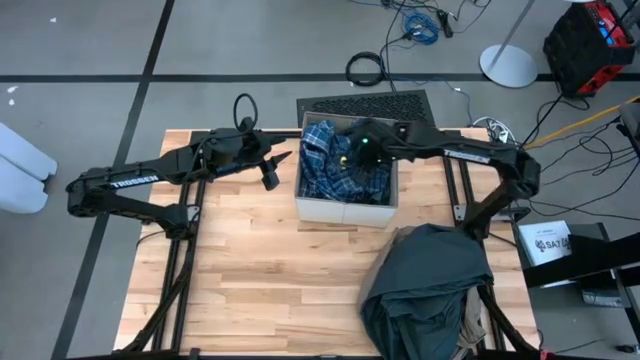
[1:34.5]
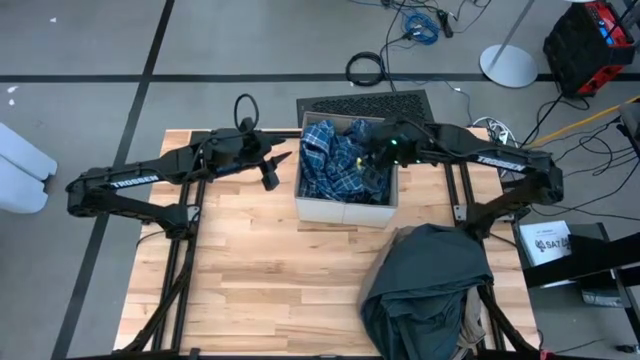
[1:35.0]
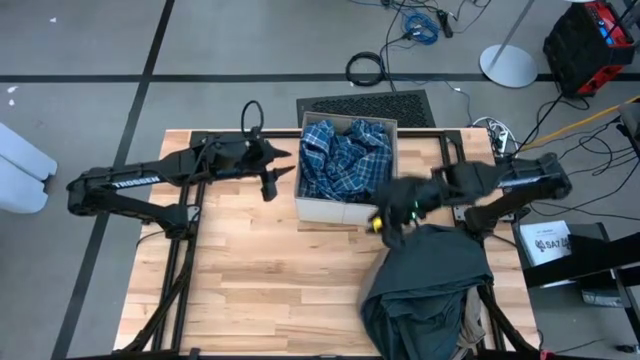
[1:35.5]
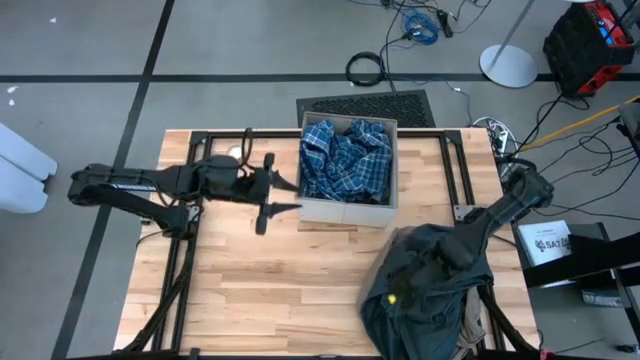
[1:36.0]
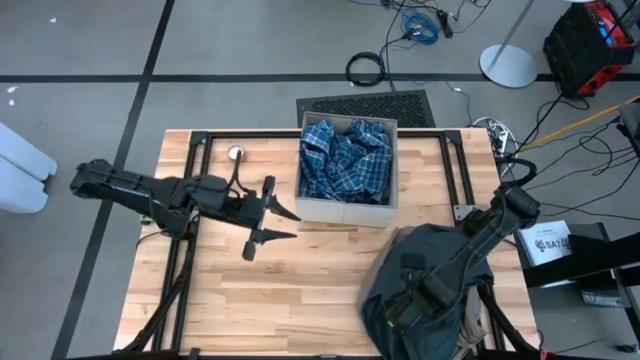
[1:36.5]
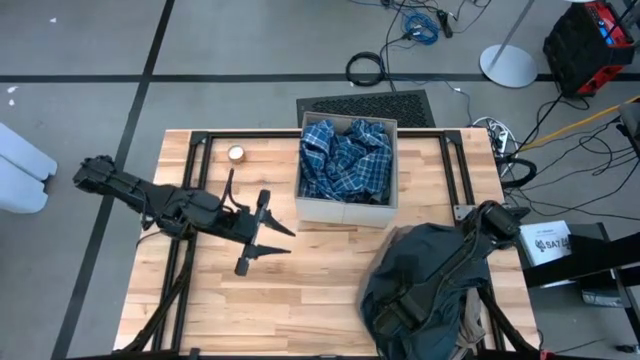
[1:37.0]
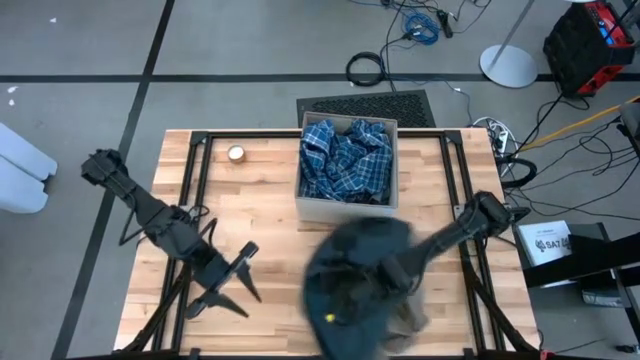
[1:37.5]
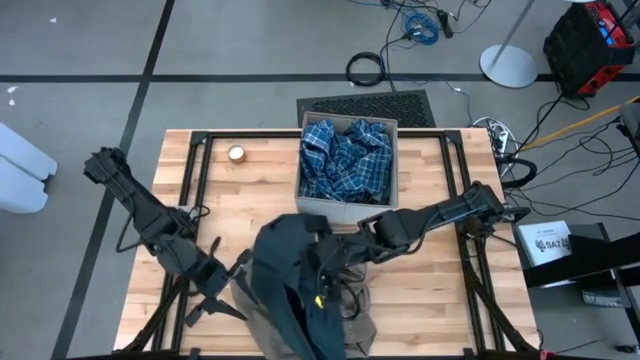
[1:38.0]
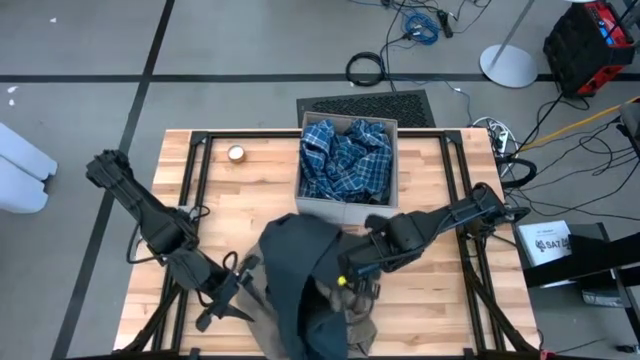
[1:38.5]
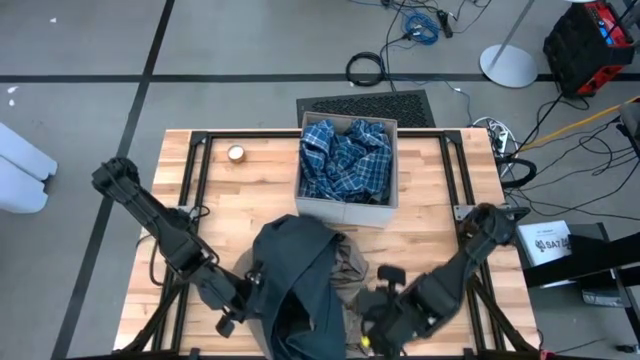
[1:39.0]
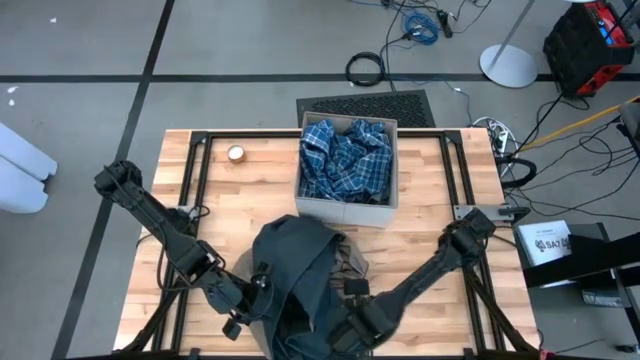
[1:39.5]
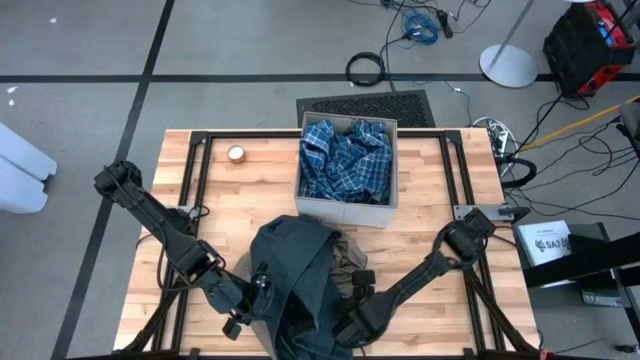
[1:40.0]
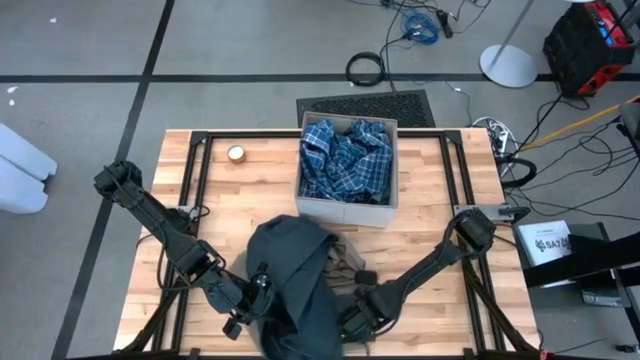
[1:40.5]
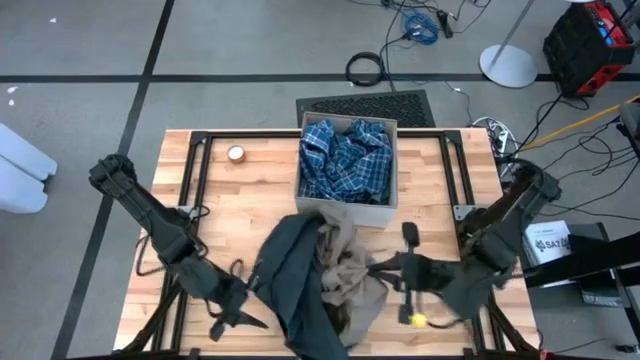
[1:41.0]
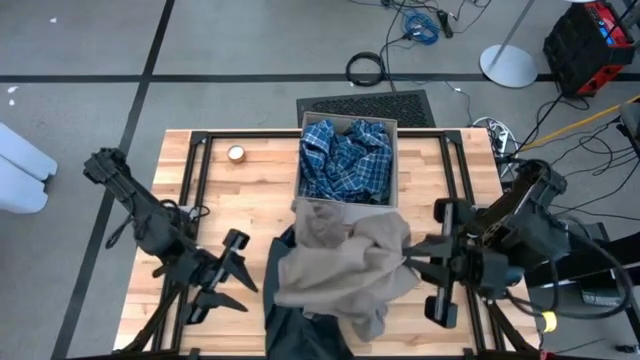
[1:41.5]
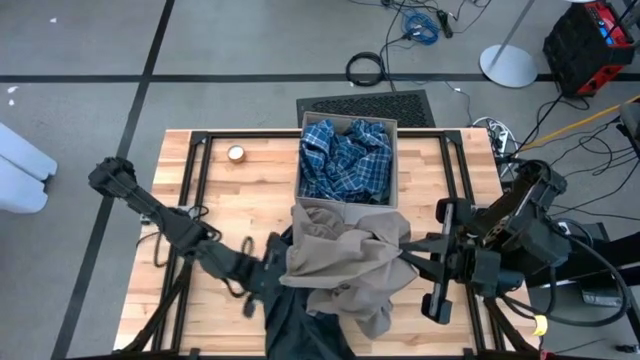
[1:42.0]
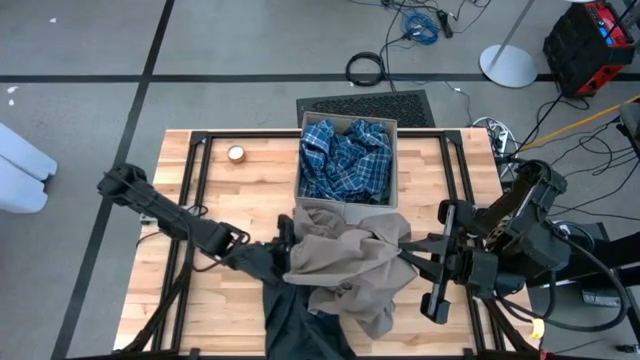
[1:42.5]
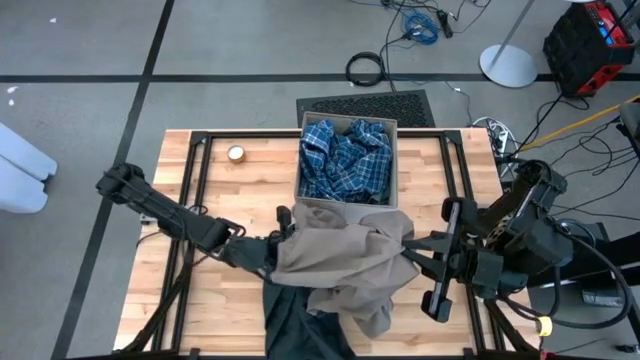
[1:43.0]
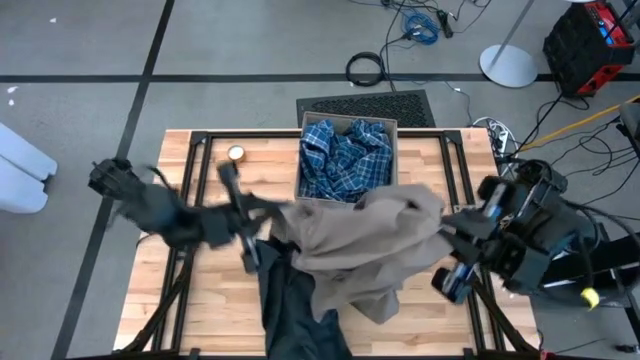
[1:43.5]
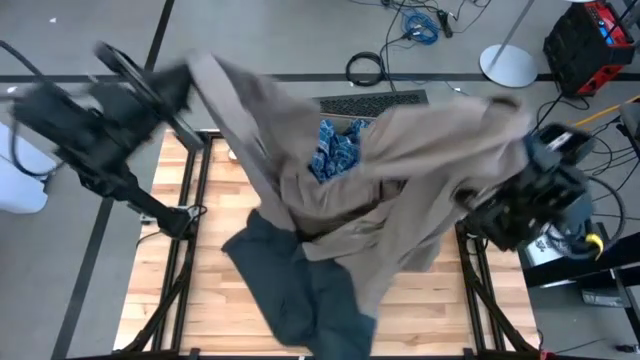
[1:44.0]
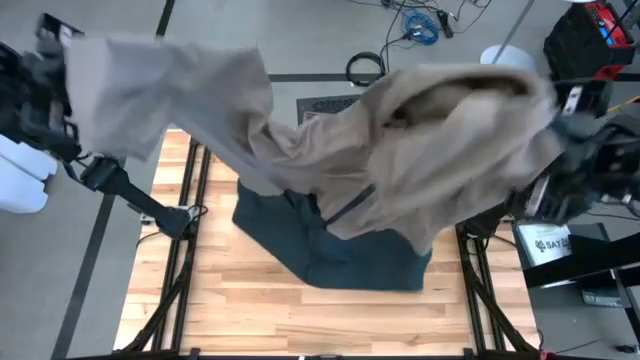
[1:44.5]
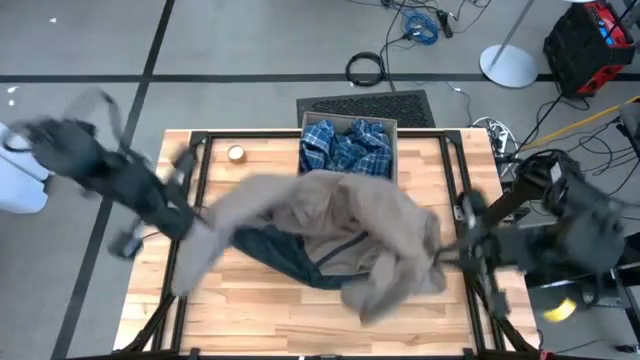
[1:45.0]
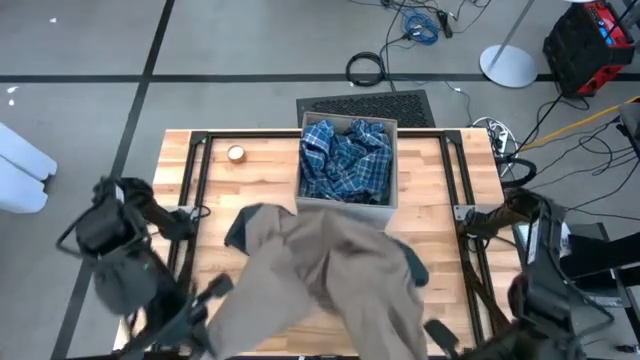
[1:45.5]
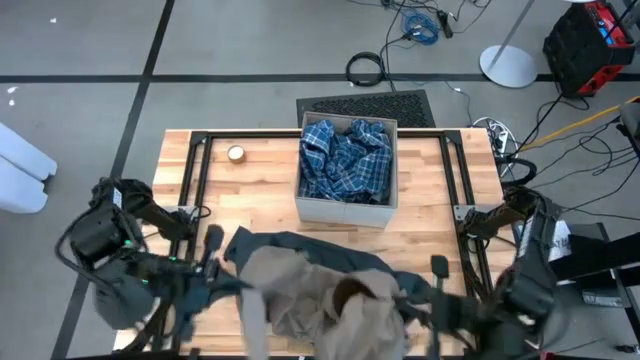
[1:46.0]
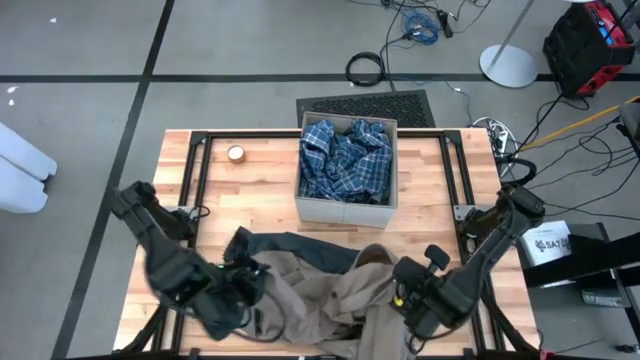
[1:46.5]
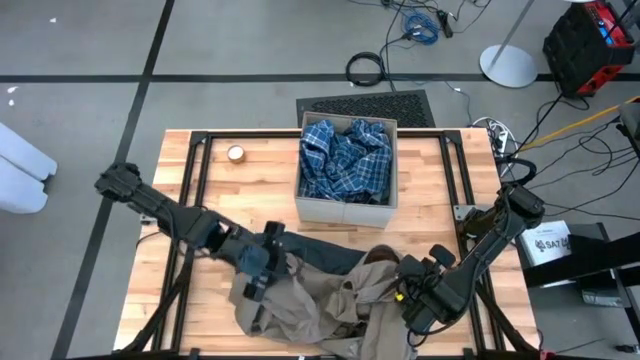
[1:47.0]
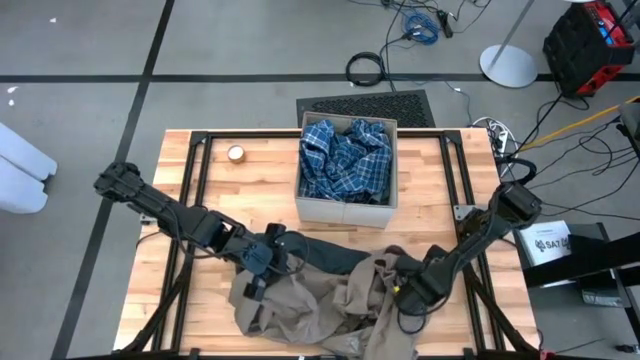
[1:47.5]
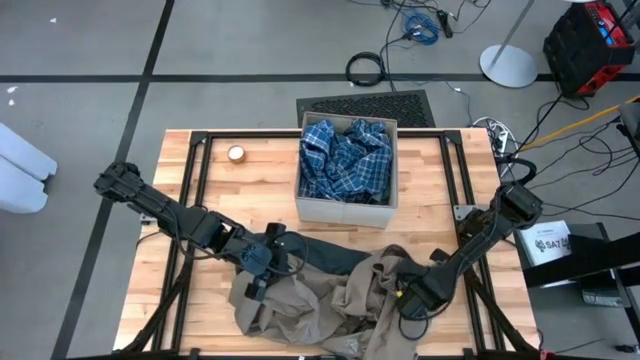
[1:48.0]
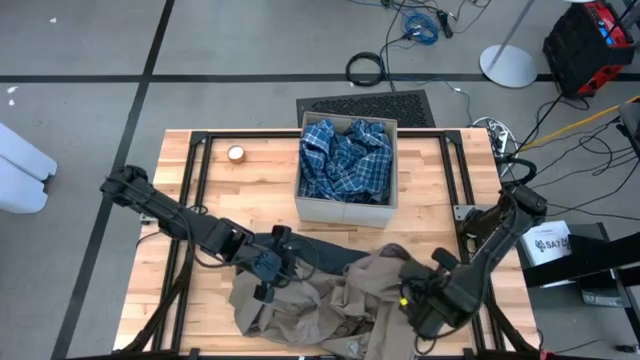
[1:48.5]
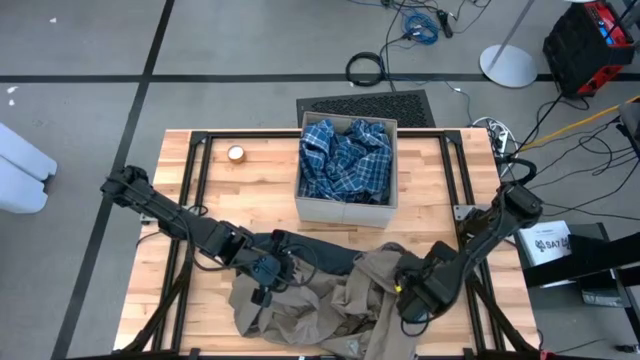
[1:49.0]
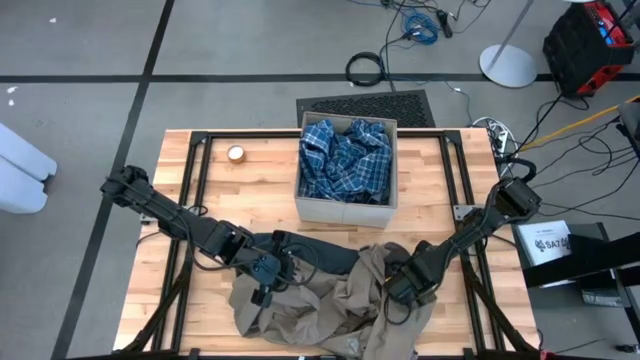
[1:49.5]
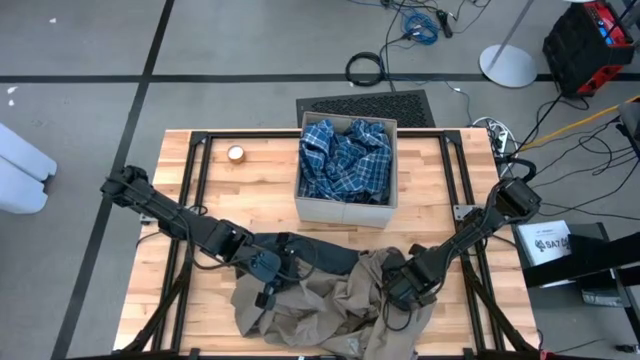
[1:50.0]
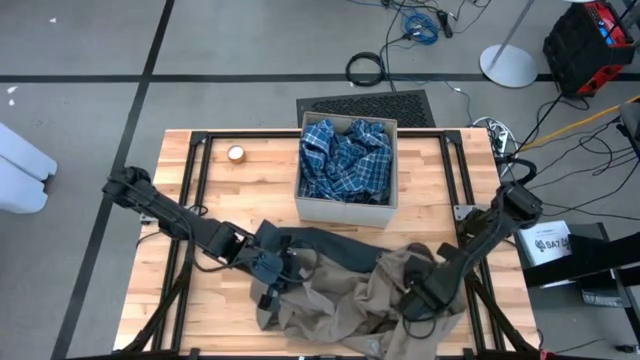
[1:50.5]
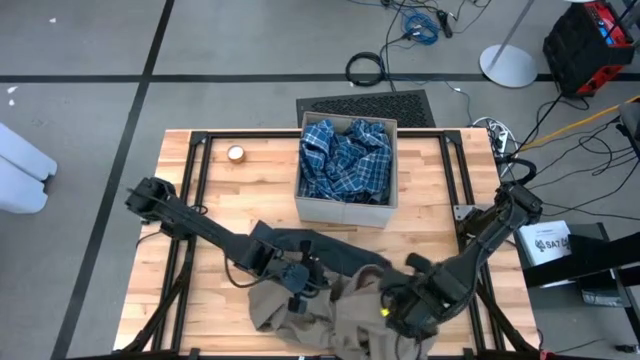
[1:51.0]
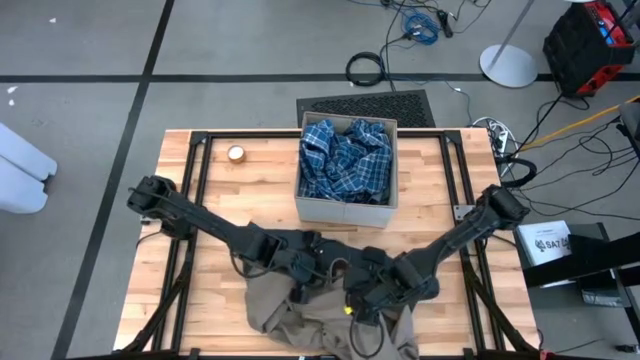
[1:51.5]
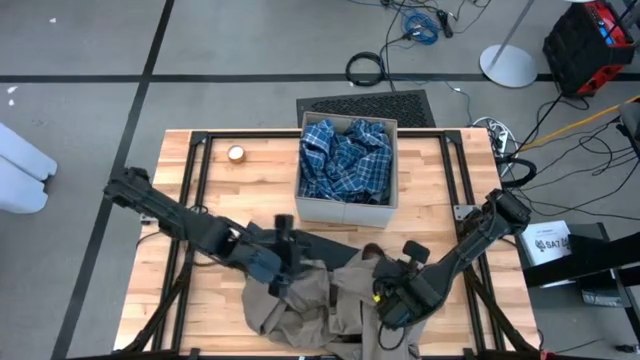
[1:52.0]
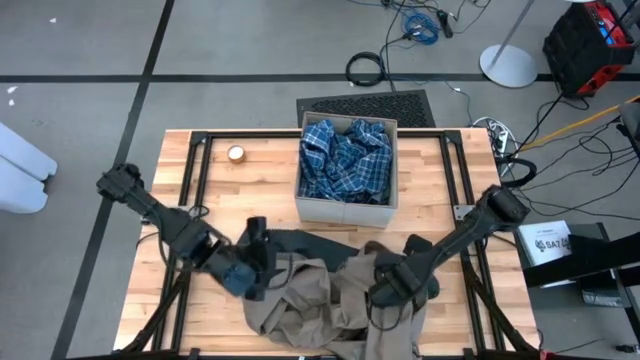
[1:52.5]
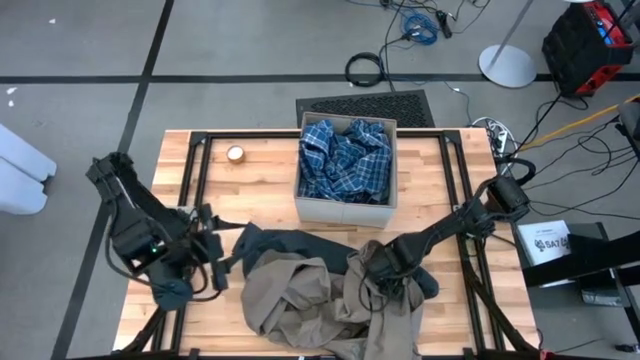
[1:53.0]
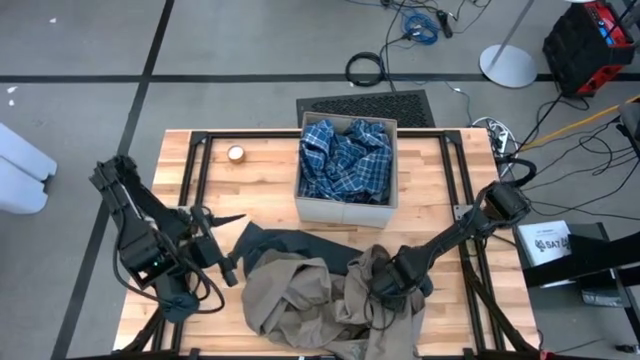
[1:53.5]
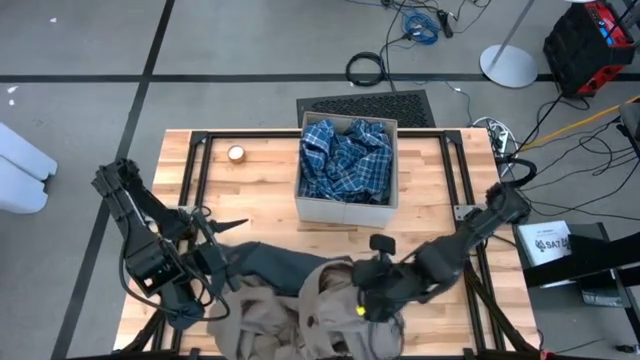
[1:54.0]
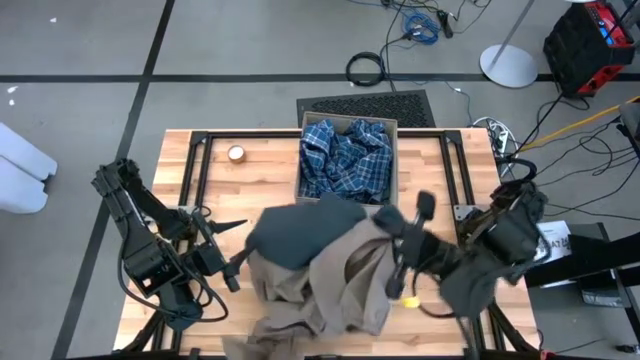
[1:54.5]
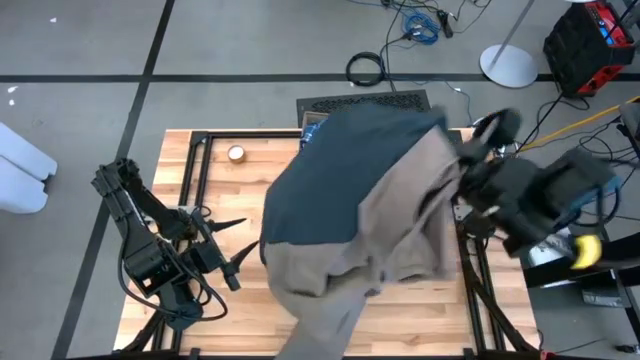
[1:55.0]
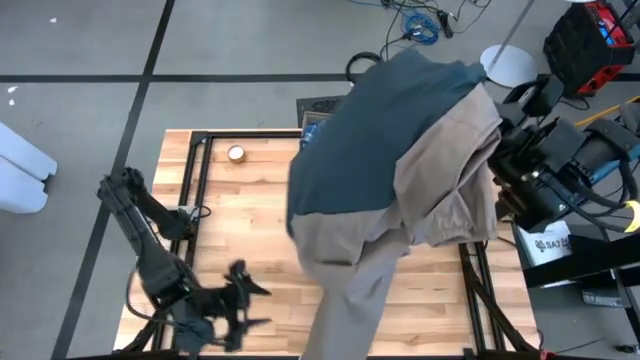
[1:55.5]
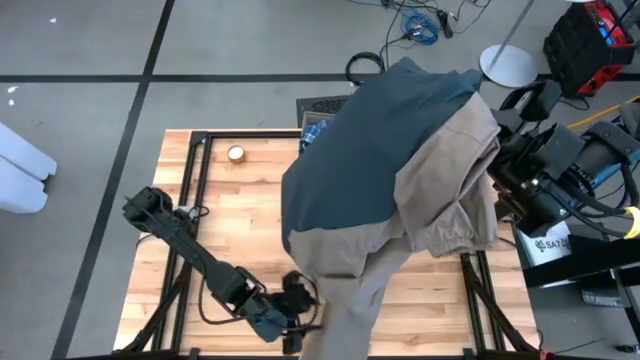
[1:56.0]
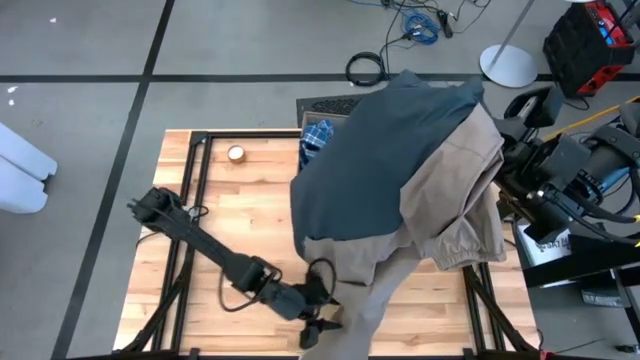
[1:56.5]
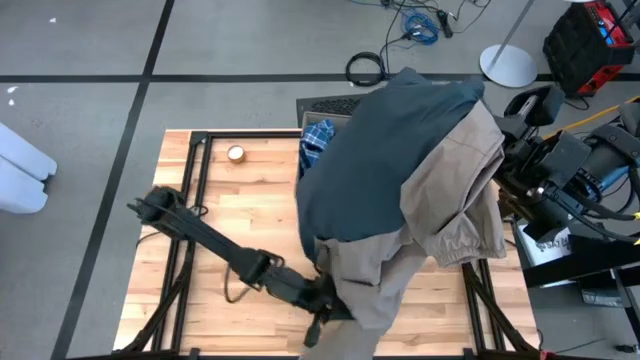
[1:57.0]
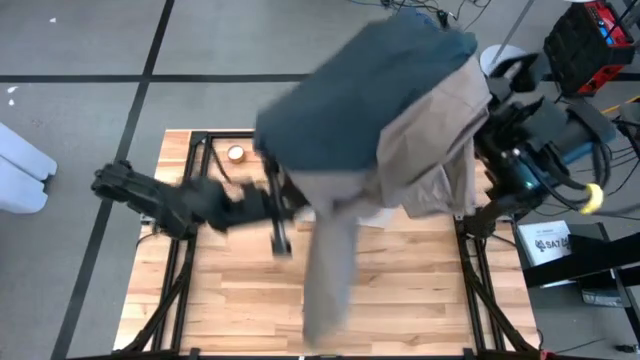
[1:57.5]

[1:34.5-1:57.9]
Task: Sort clothes
Put the green and brown jacket into the laundry organizer
